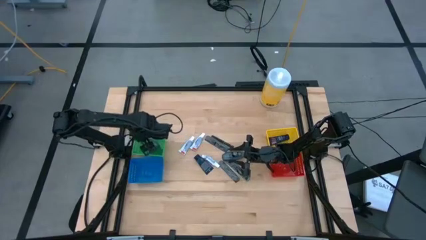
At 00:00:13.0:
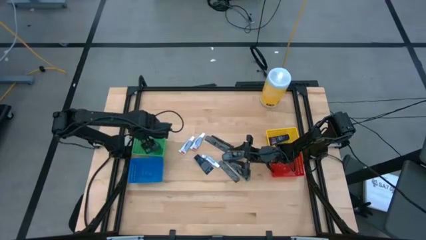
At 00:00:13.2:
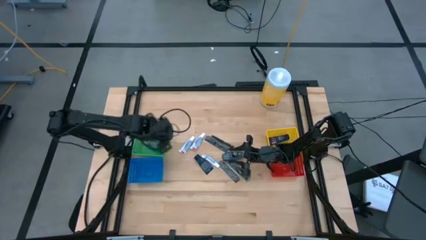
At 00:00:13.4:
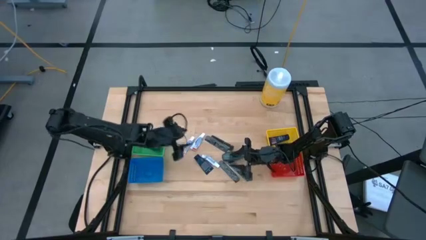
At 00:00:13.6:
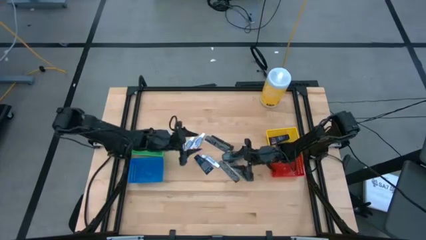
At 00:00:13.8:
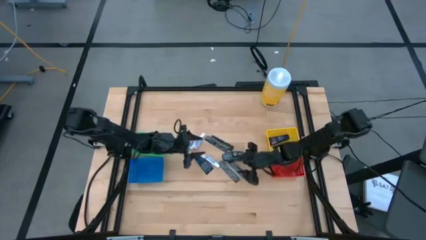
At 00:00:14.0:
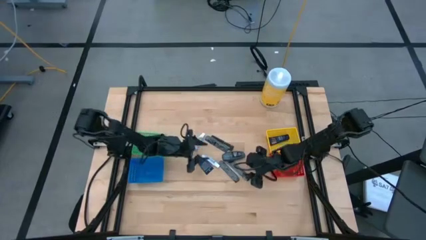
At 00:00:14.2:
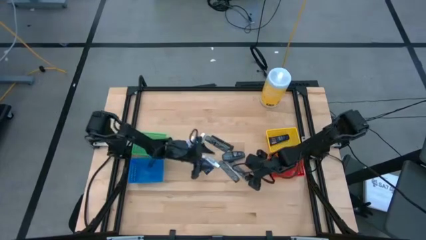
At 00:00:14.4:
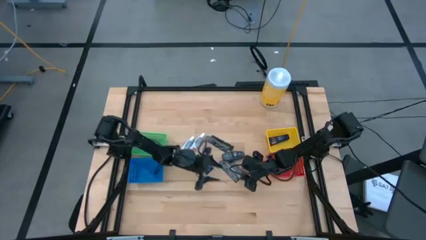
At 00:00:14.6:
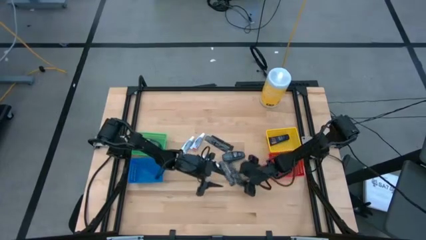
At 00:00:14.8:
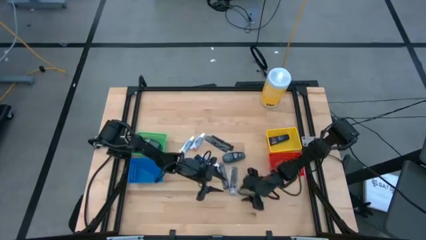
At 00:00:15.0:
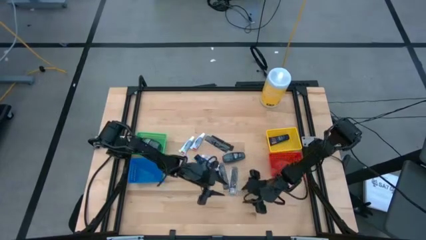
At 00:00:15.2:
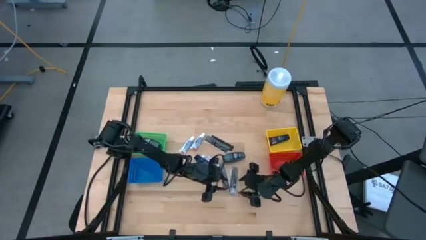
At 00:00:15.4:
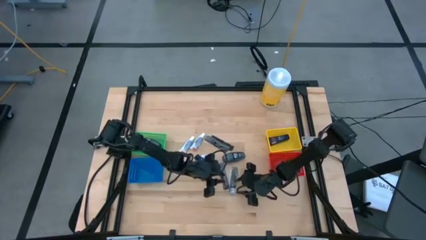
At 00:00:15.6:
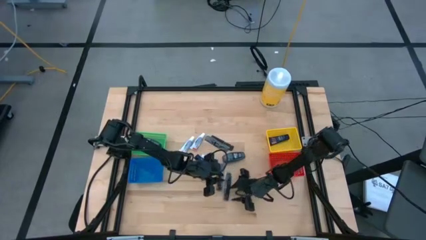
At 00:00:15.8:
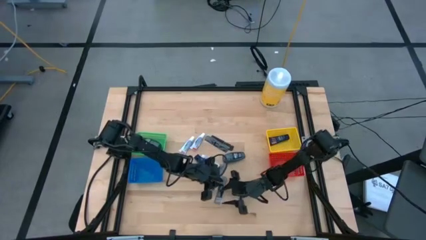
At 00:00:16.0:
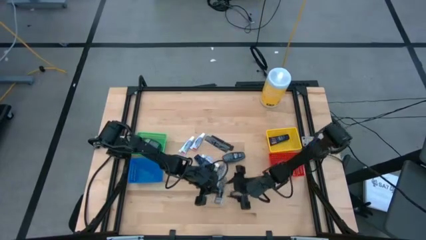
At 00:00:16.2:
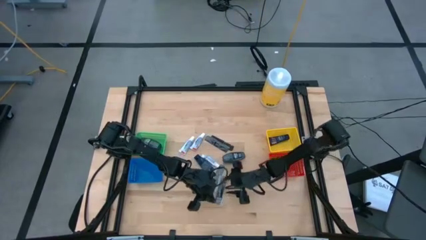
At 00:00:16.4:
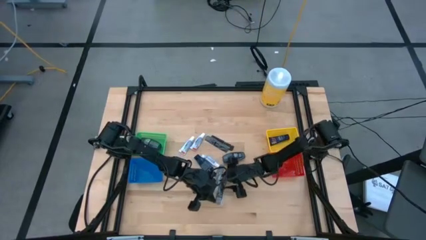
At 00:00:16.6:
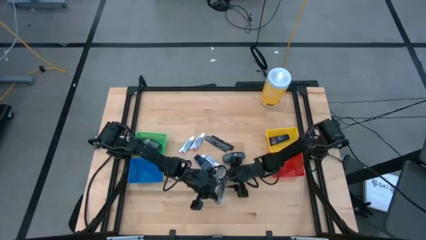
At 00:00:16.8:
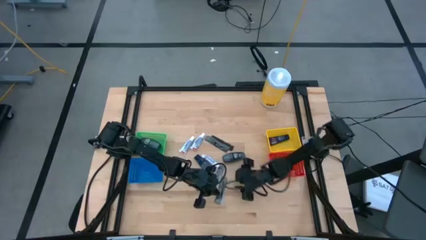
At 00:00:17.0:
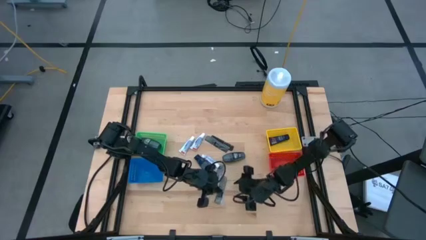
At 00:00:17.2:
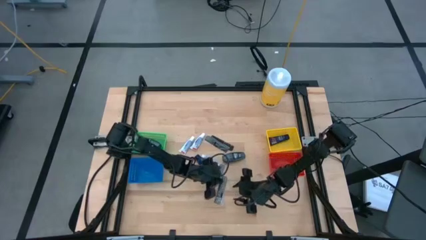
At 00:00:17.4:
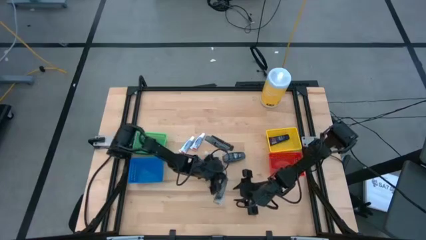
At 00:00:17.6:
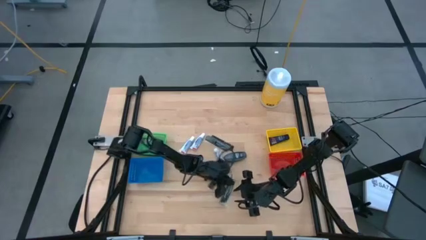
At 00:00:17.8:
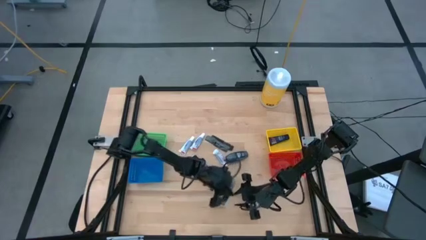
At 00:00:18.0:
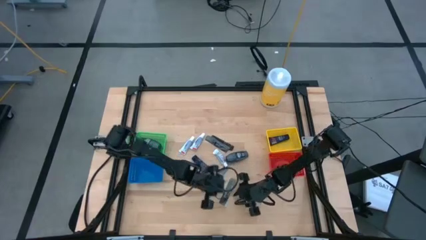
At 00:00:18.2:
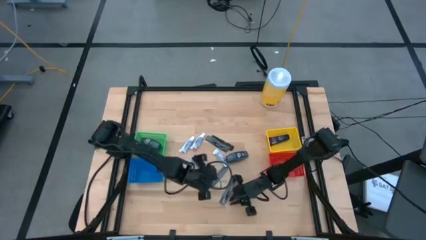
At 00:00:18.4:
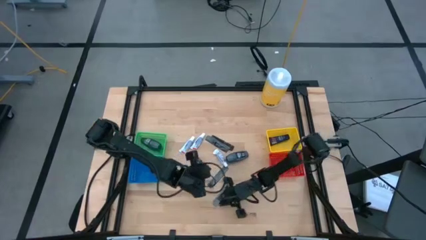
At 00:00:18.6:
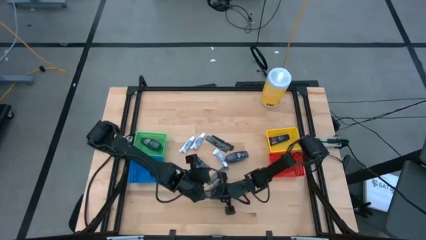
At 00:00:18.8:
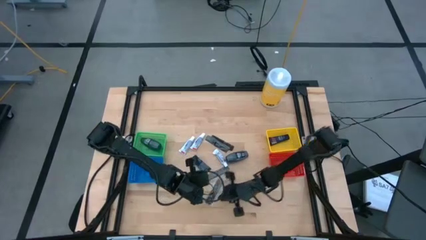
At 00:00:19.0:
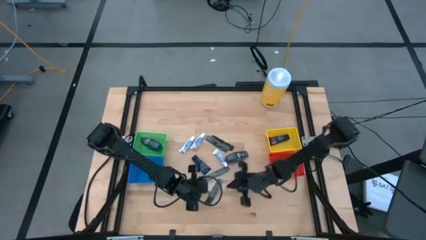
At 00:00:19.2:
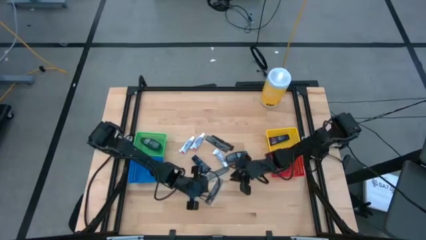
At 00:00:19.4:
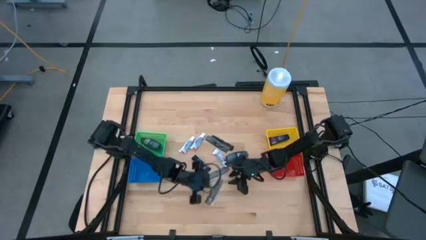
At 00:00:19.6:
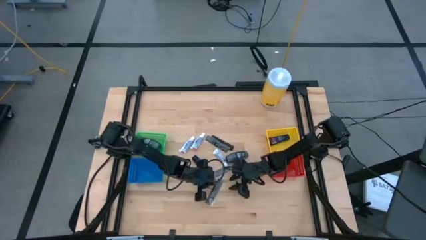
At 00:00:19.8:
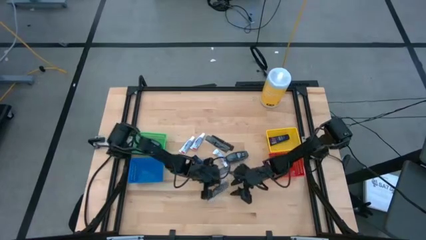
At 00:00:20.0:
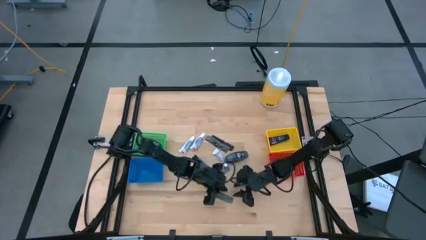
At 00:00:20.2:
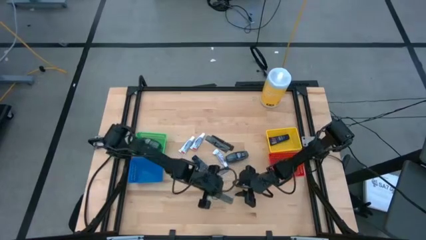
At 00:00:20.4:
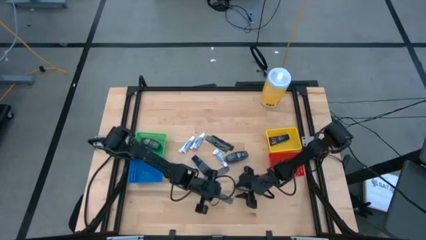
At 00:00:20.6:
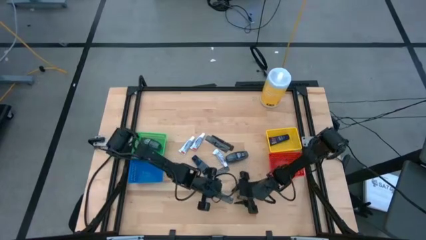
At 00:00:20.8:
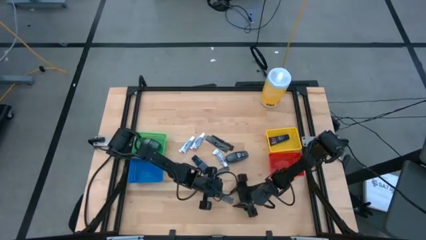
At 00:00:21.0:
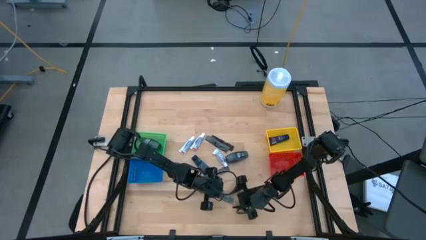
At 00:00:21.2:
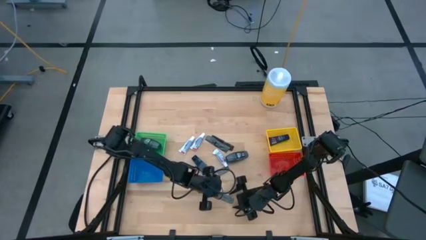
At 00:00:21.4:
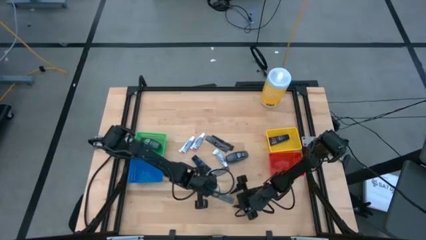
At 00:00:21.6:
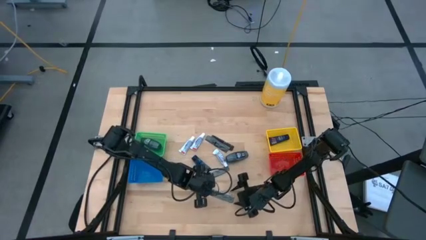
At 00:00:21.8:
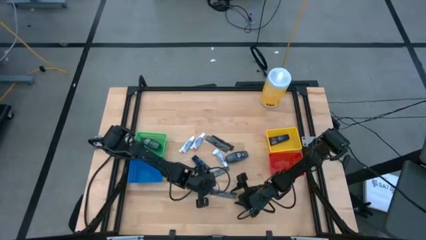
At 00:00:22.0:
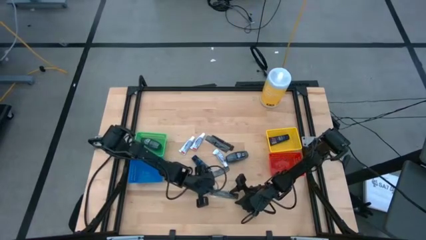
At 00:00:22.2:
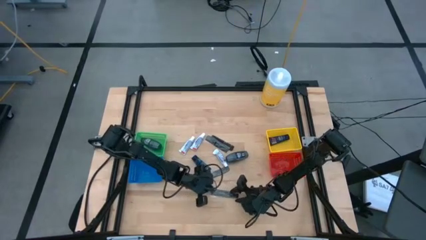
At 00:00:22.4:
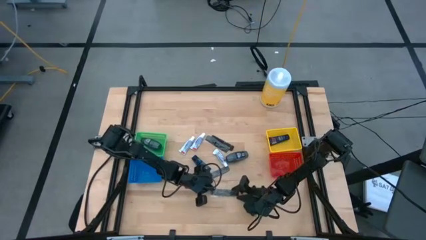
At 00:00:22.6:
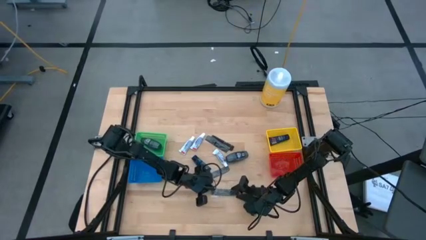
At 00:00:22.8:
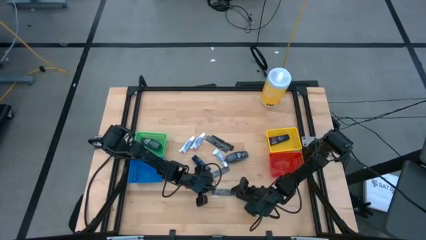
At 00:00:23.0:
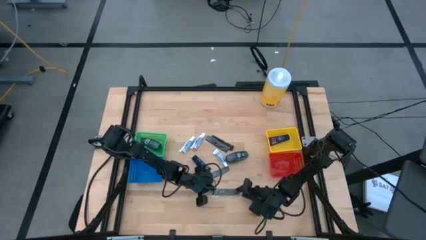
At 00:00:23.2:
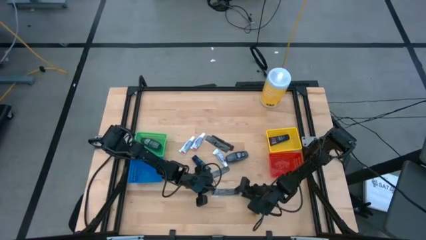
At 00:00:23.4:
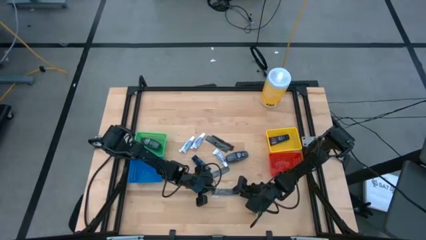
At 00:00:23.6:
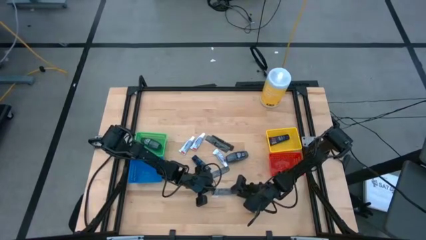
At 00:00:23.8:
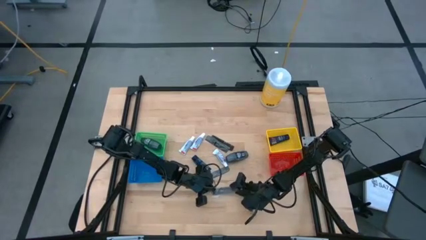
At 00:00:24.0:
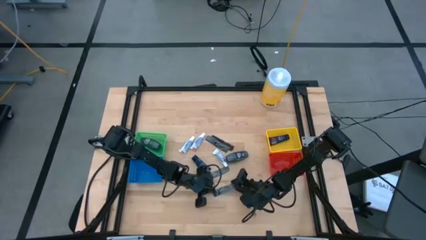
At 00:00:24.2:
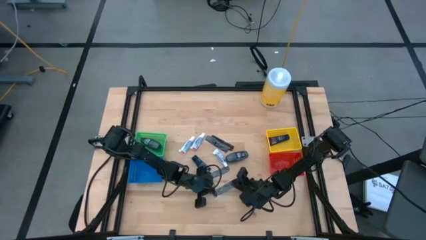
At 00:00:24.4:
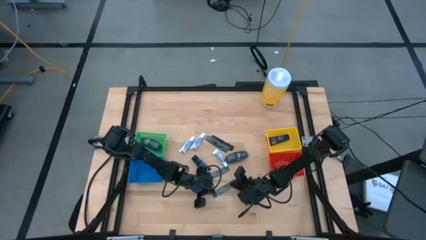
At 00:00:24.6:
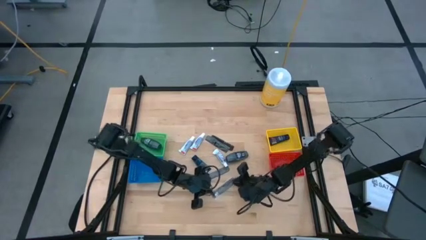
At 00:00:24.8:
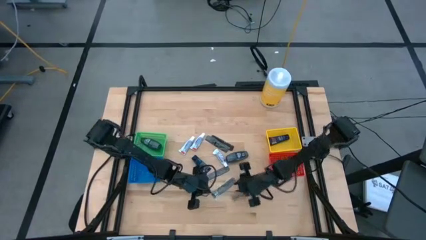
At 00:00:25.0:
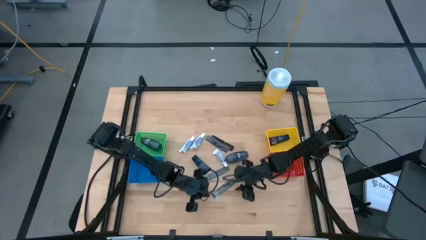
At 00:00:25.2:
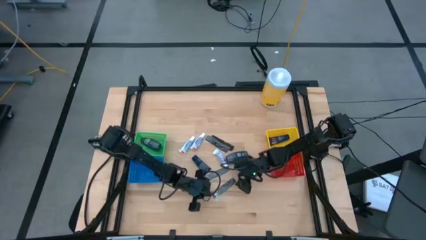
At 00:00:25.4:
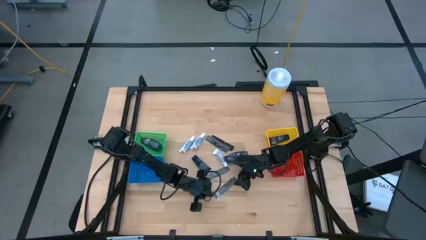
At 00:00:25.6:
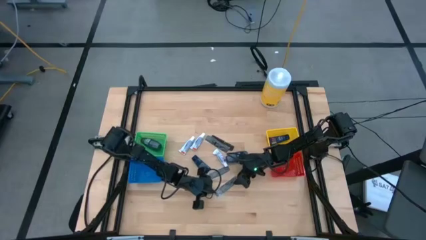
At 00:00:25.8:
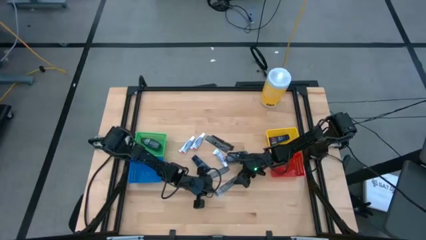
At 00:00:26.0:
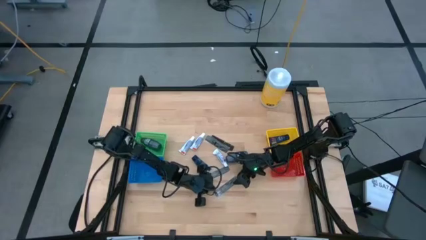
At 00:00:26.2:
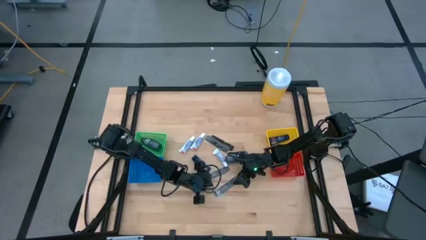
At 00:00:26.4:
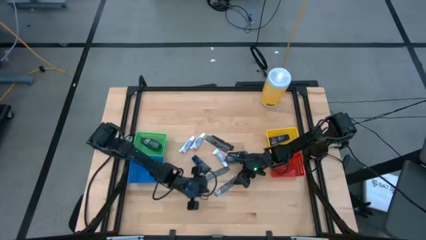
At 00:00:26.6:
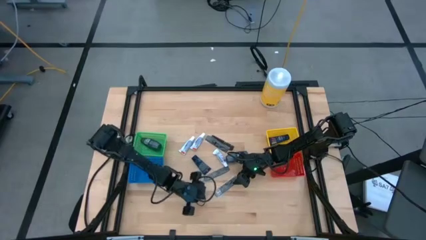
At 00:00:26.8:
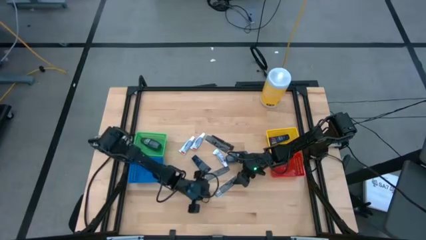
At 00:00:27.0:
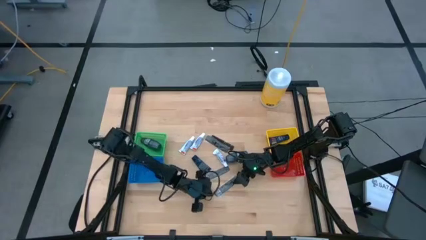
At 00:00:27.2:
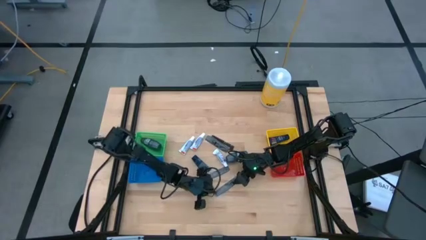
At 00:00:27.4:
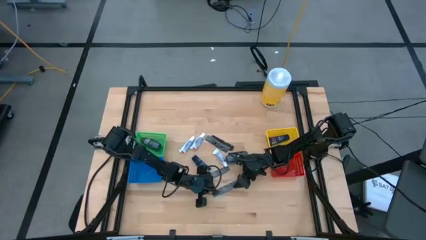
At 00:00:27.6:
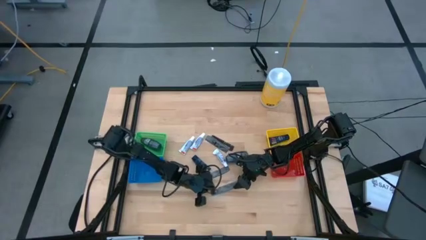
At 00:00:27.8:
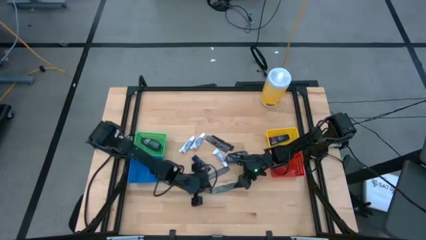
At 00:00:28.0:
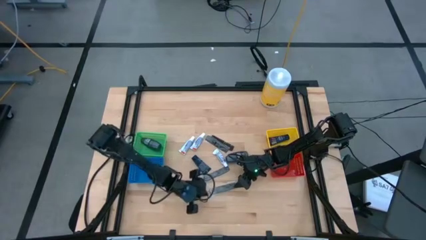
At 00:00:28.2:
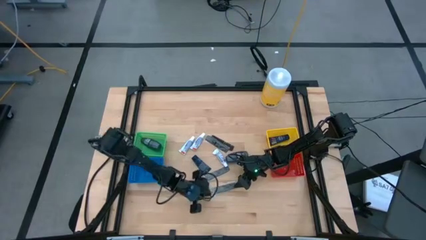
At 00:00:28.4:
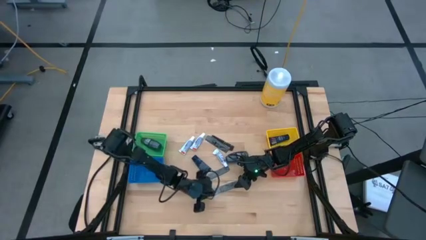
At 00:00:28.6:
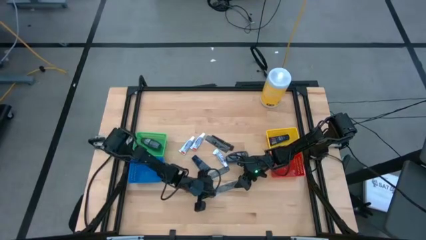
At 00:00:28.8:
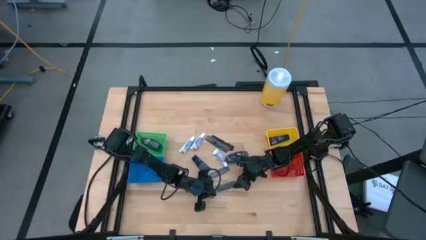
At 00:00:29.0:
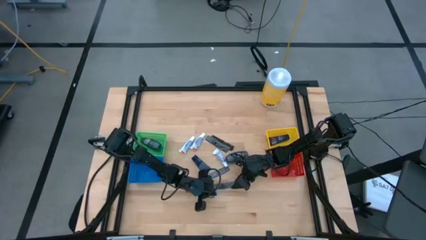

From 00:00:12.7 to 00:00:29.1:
Task: Pick & Place Travel size toiletries
Put the black comb into the blue bin
